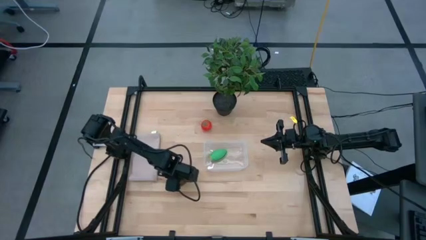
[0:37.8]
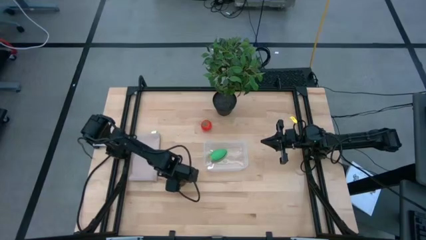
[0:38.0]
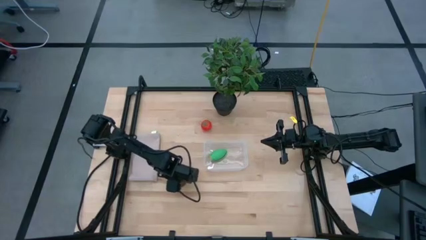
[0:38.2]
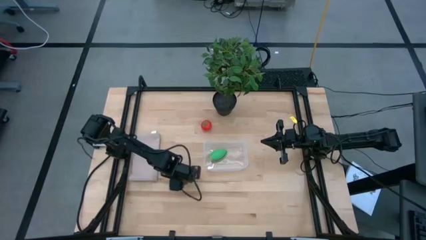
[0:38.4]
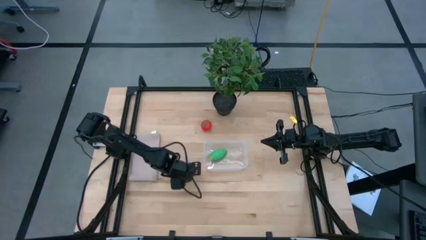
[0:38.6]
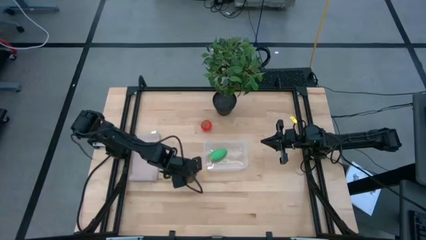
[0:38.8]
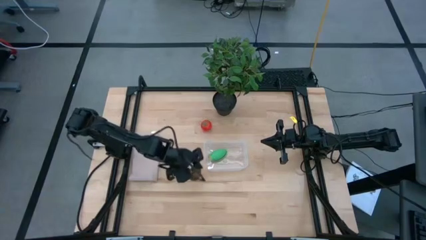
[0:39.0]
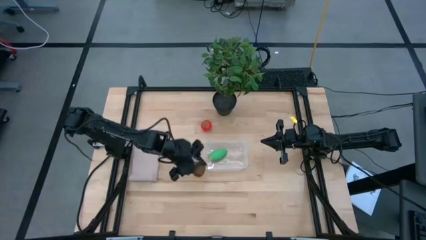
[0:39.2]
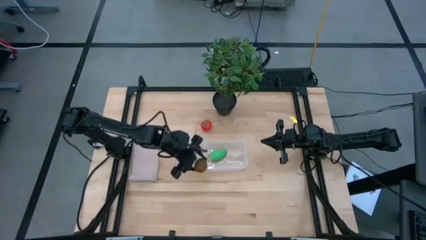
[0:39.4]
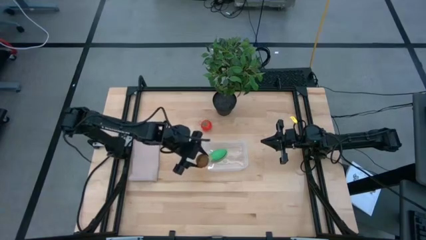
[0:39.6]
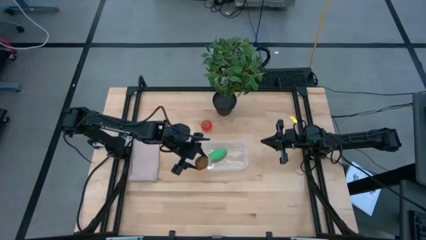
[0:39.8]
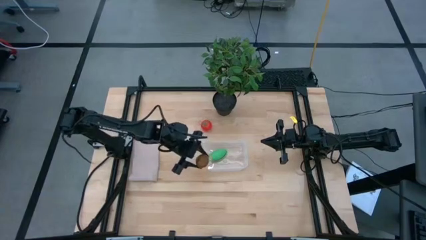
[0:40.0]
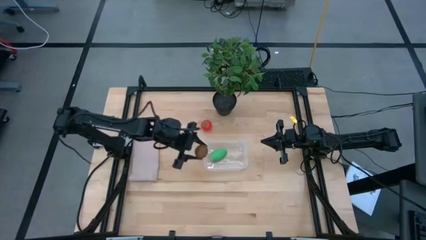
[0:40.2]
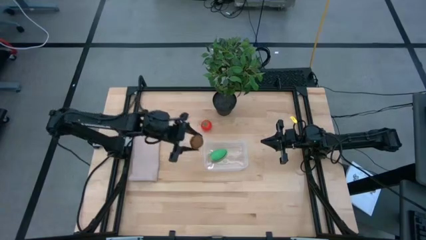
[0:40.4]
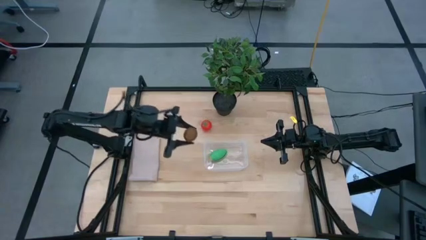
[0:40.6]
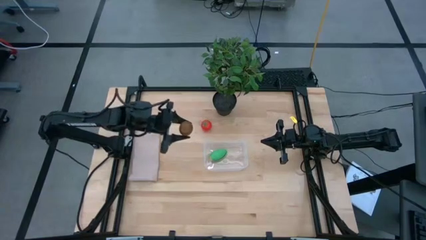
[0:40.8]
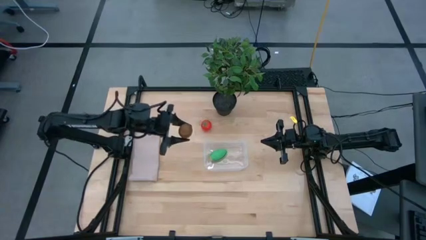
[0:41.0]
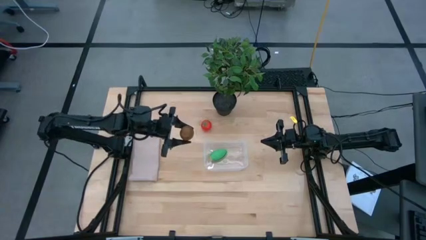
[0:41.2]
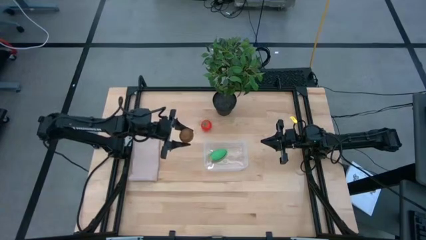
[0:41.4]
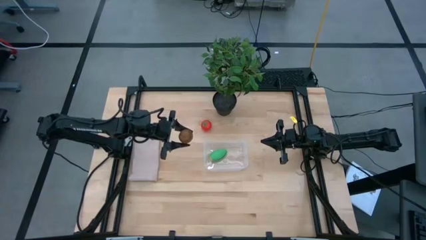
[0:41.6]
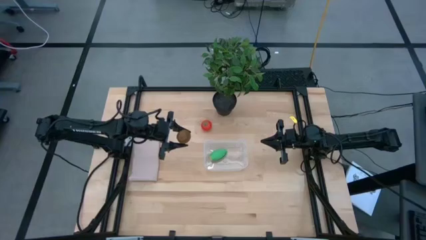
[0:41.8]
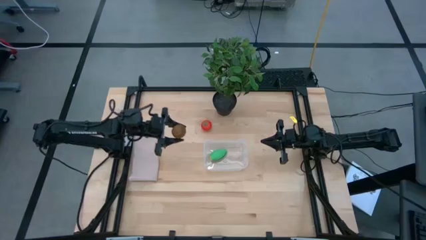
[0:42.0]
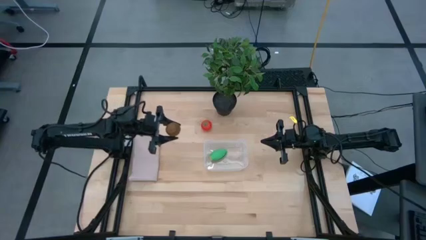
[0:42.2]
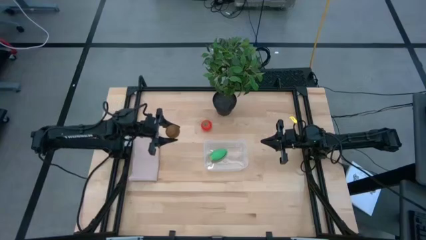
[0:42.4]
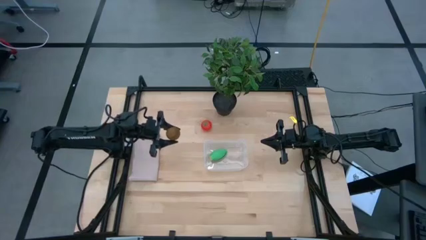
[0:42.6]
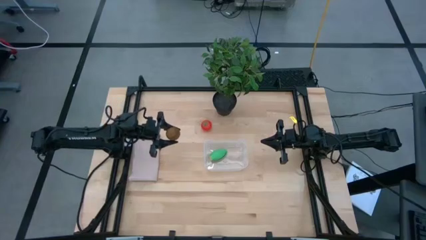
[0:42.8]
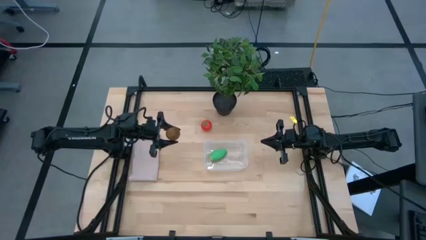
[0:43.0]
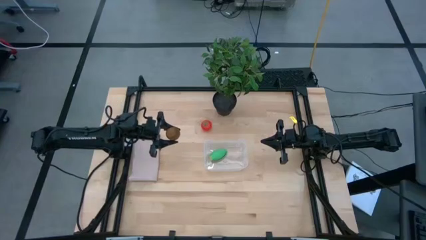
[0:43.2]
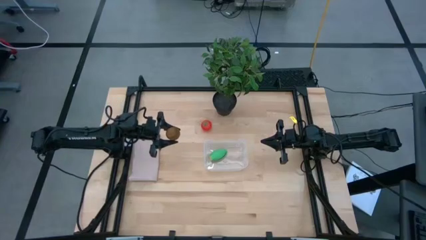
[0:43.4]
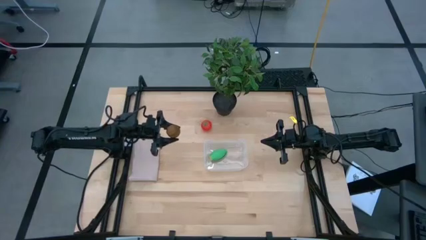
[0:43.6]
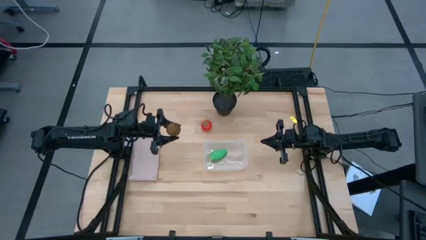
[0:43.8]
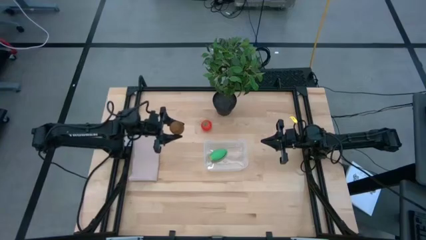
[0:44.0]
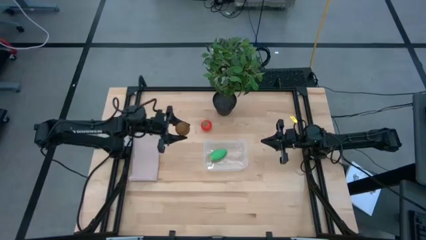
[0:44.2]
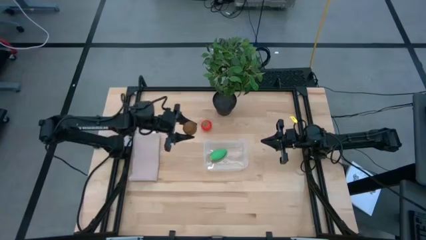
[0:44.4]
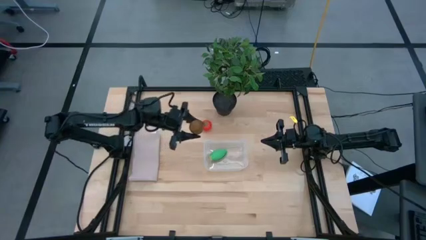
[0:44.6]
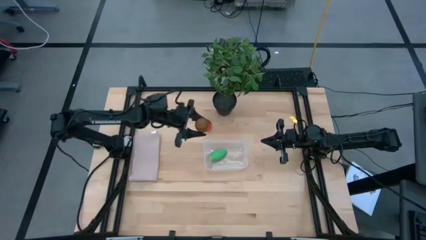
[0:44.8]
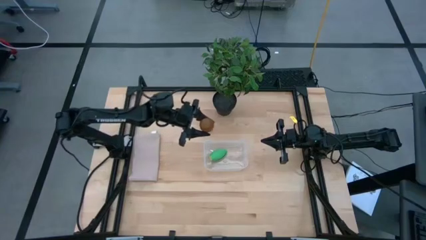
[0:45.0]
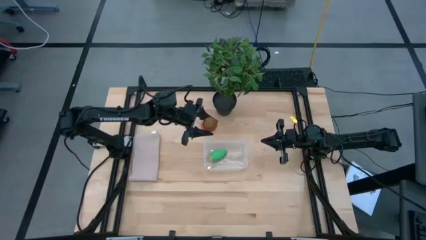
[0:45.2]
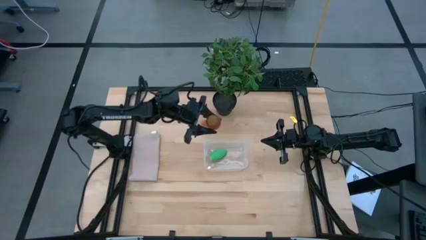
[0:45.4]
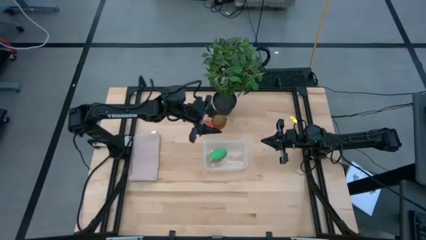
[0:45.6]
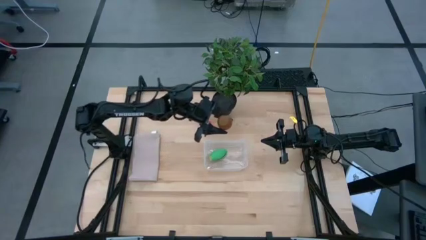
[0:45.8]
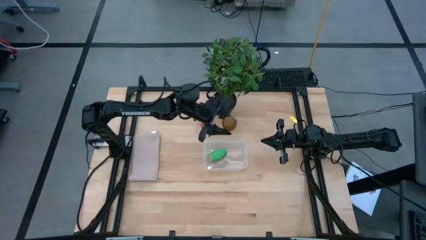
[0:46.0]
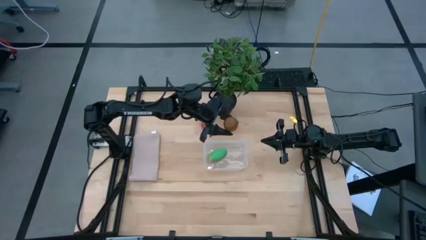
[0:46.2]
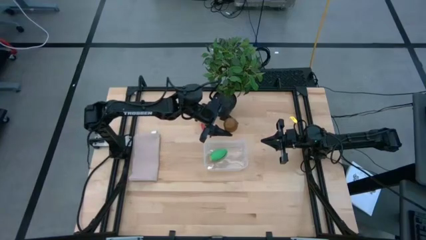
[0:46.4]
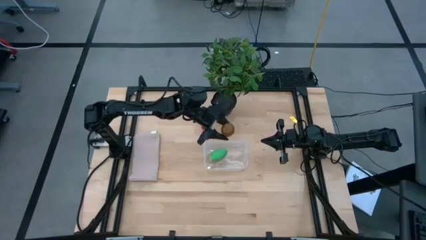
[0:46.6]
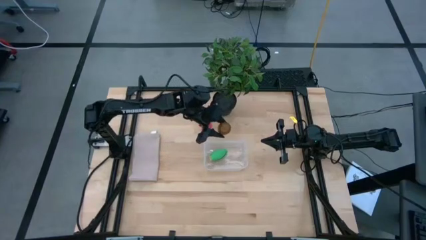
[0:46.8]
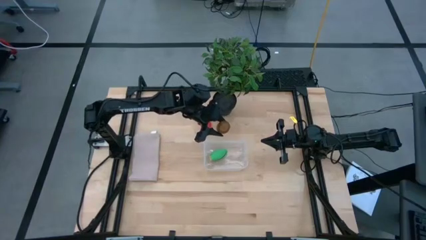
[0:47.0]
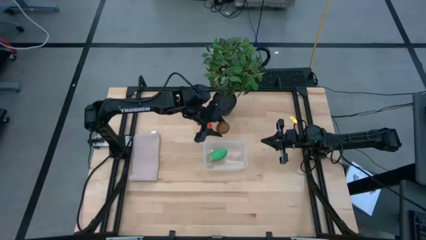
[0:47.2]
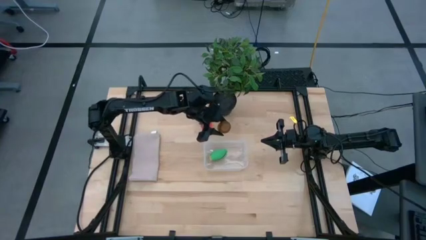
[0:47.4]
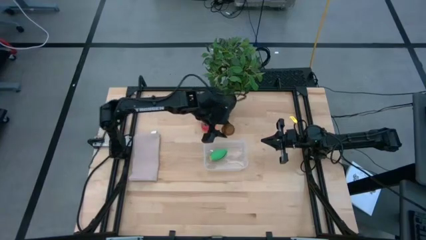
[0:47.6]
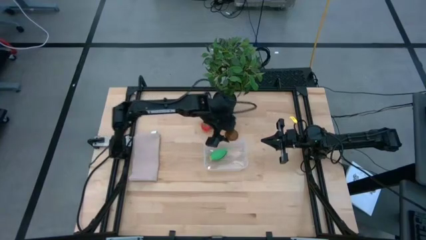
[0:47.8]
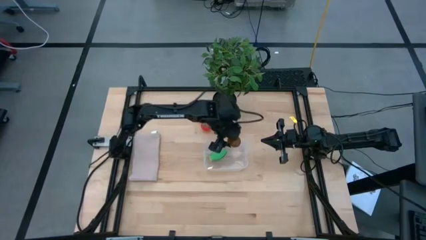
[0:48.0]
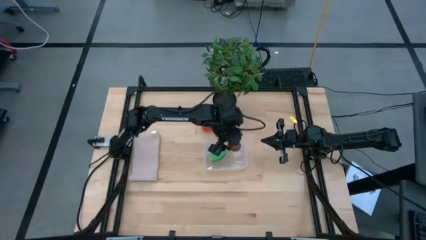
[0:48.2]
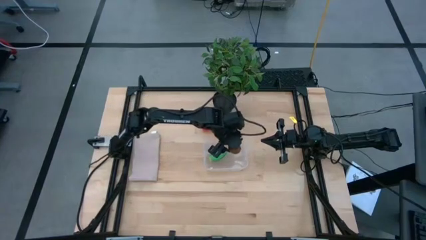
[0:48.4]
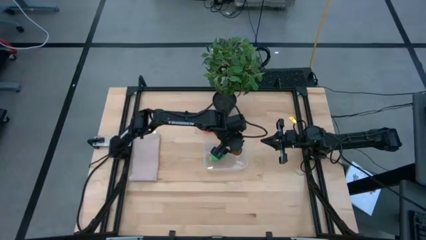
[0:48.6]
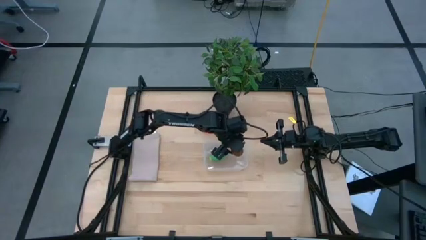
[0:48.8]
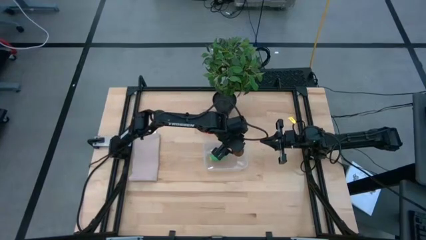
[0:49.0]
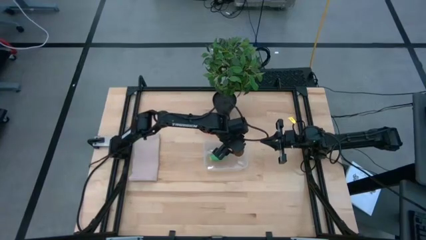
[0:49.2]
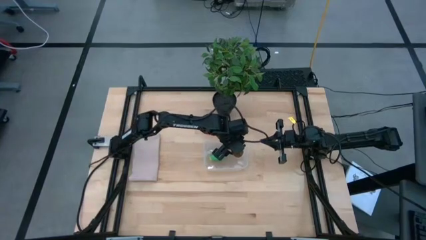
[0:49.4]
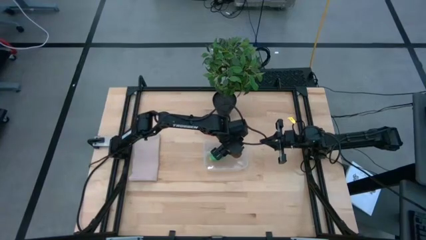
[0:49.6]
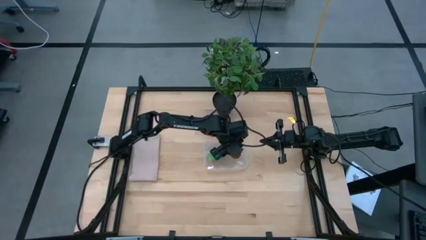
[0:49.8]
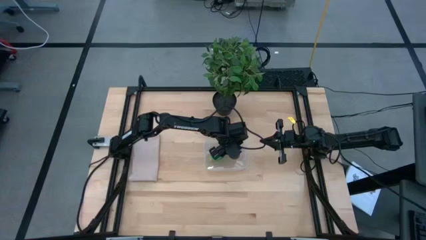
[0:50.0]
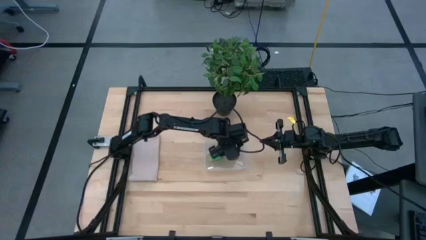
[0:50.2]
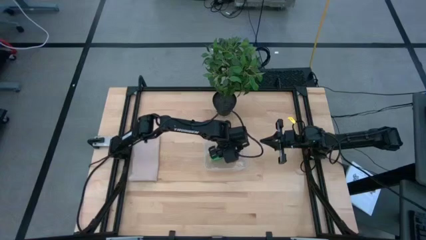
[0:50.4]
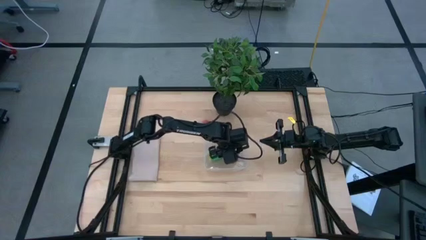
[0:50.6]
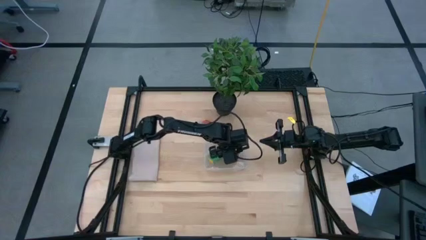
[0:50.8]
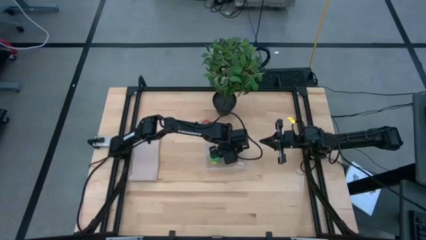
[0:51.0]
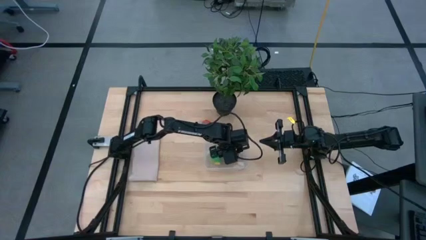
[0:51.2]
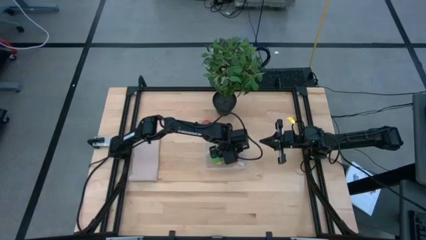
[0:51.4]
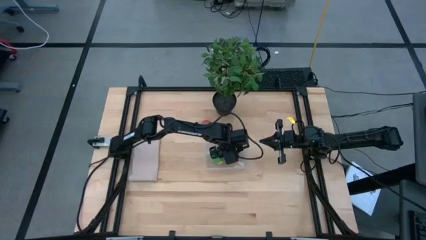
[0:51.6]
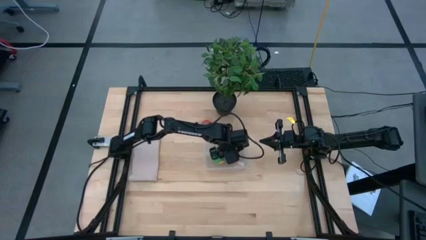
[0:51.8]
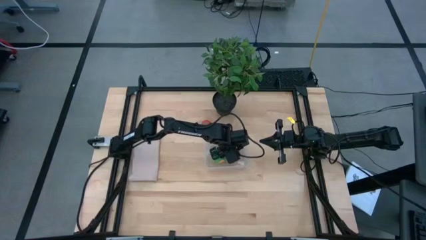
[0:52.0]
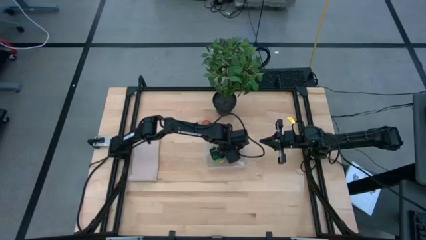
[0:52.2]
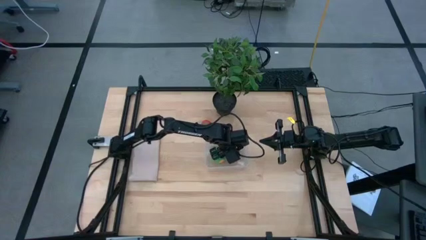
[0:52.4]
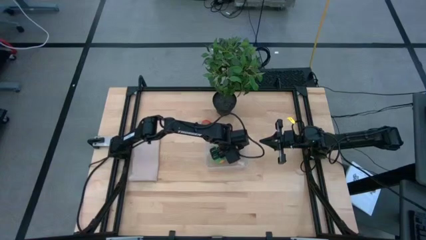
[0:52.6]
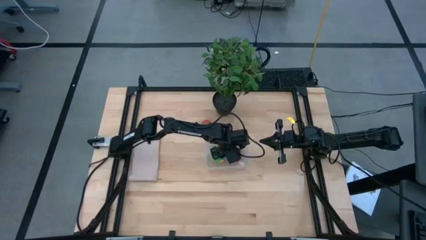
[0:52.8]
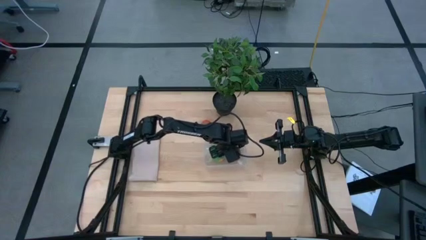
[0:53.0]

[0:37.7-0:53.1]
Task: Pick and placing Produce into tupperware
Put the brown kiwi into the transparent bin
